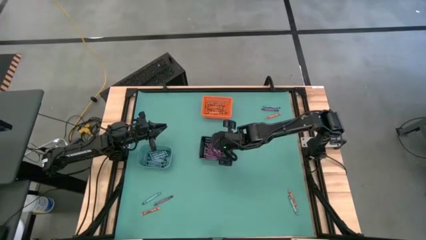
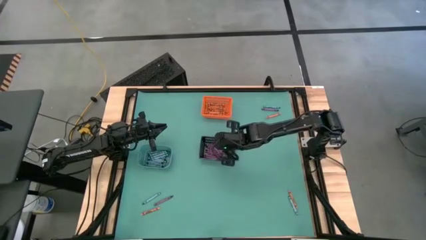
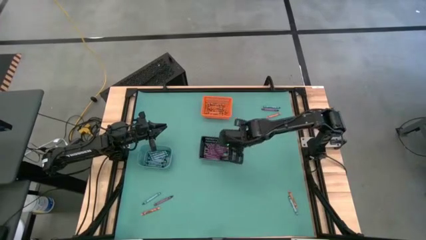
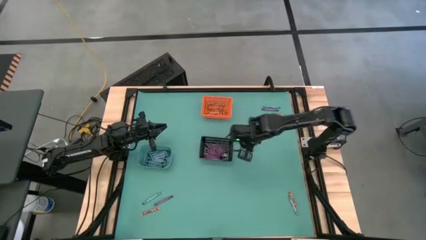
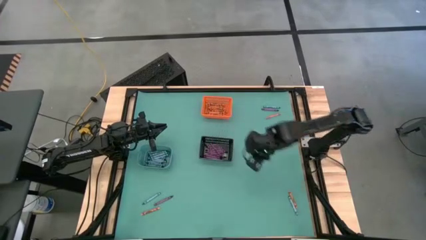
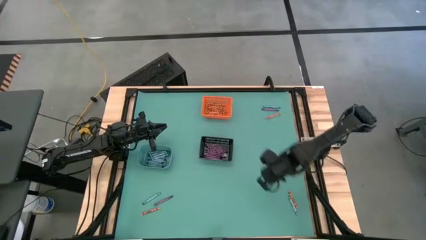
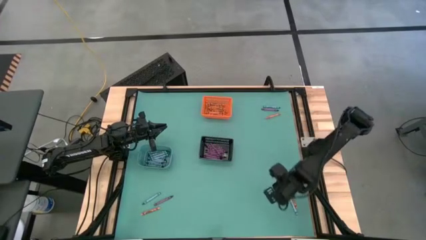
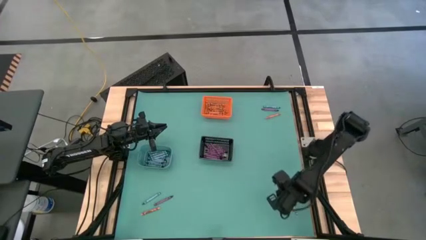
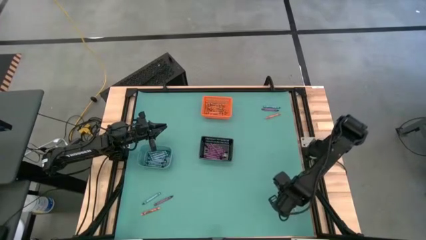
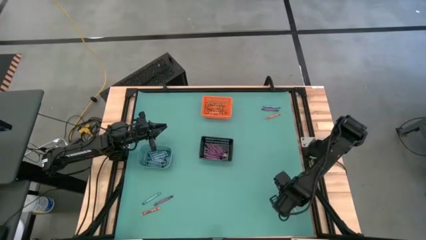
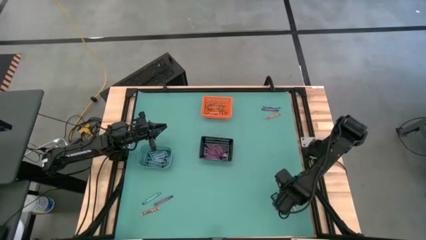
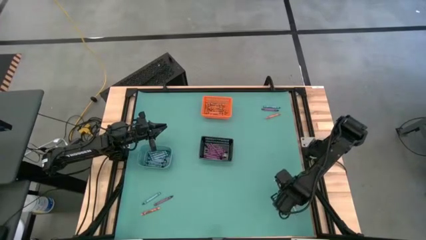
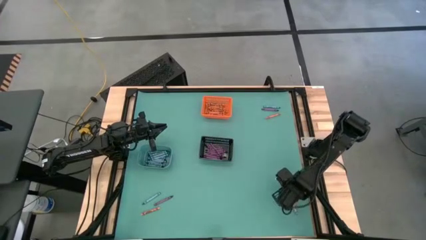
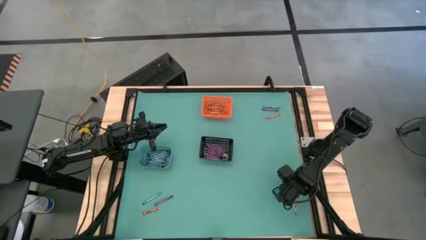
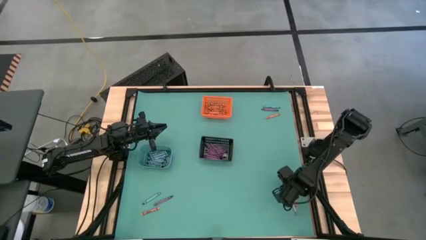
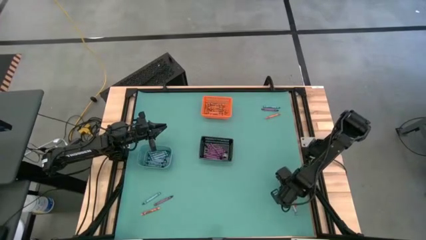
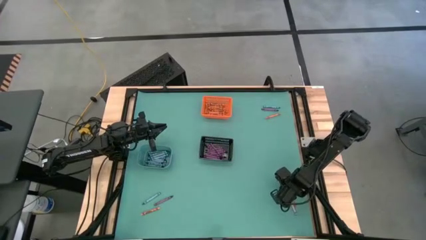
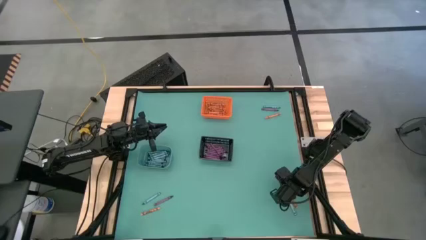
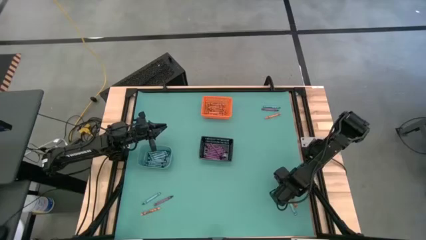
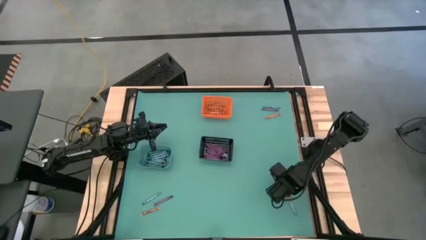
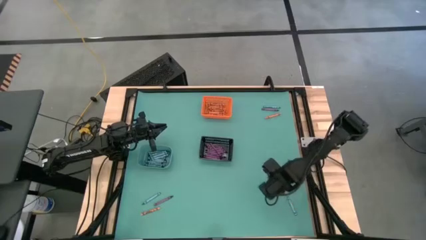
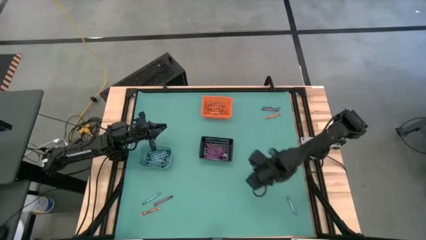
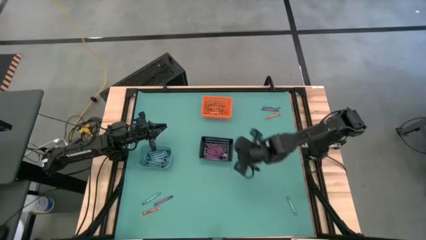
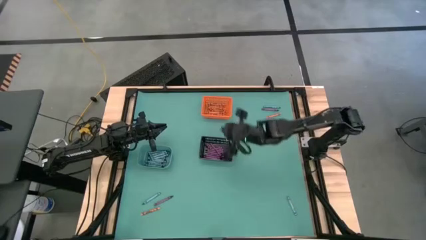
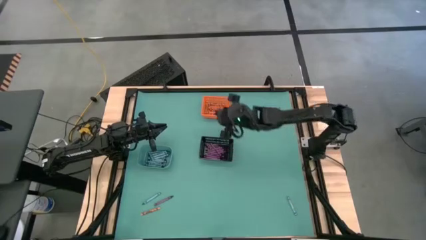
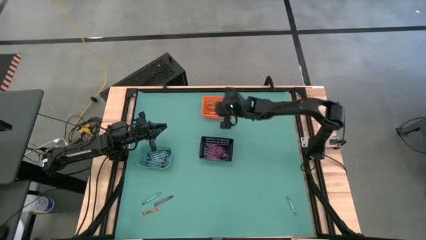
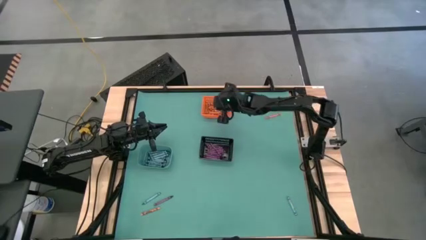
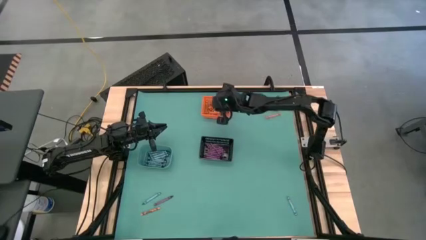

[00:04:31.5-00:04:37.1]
Task: Sort crayons
Put the orange crayon into the orange bin

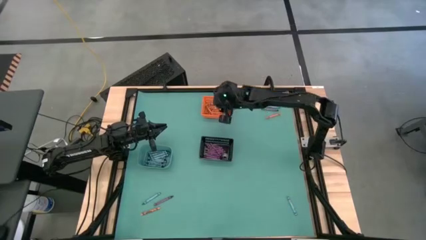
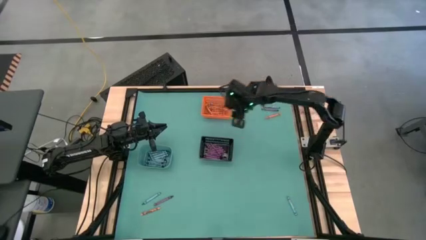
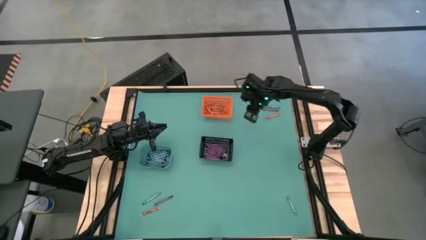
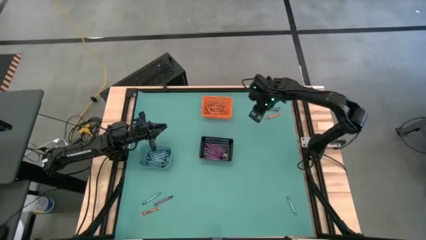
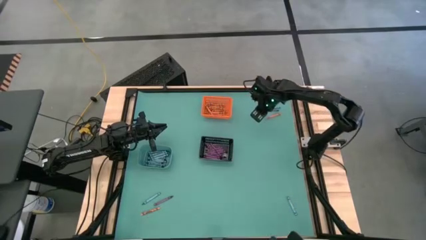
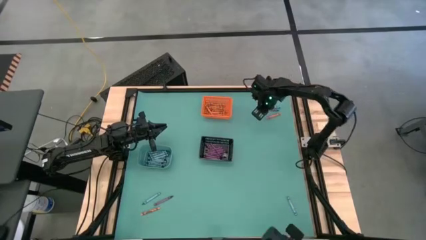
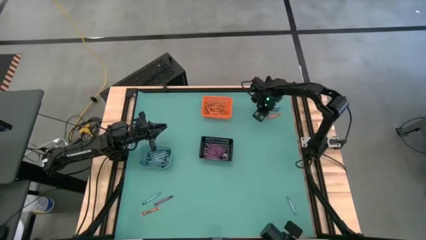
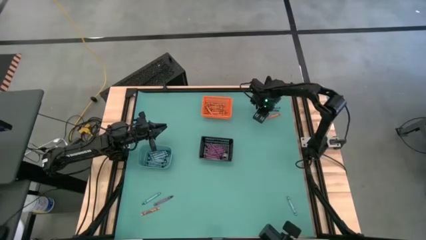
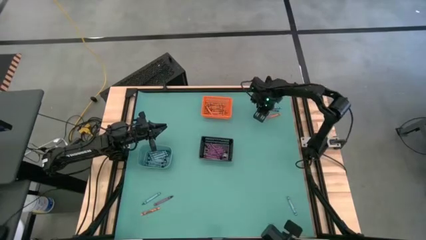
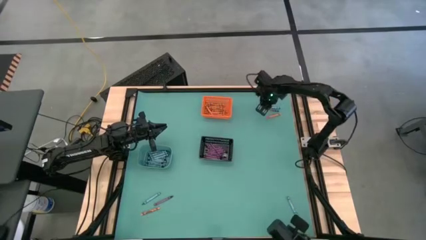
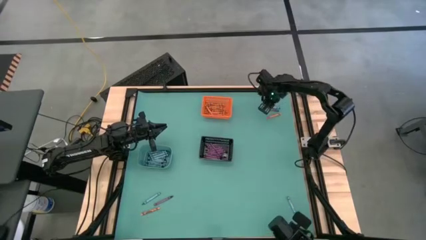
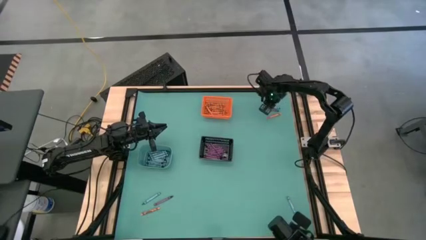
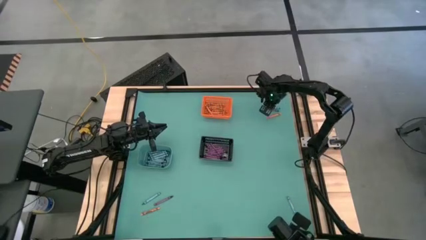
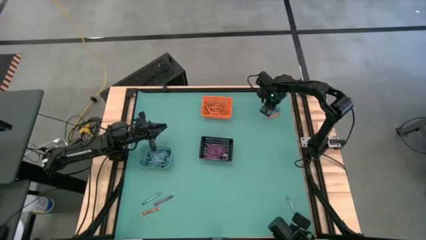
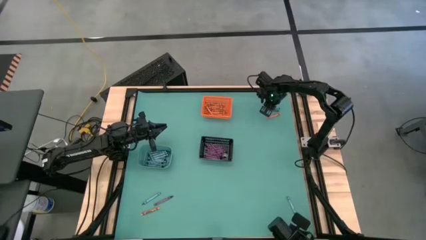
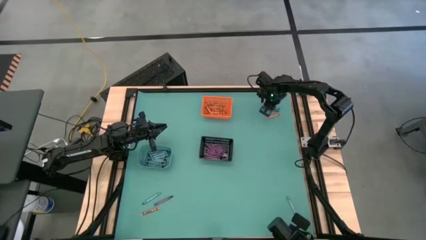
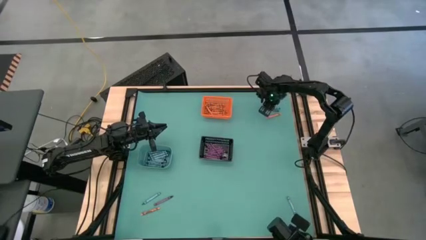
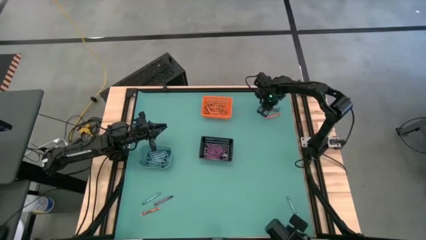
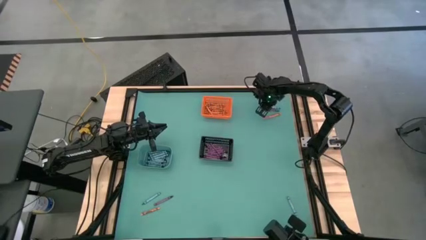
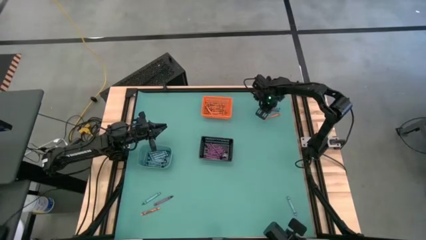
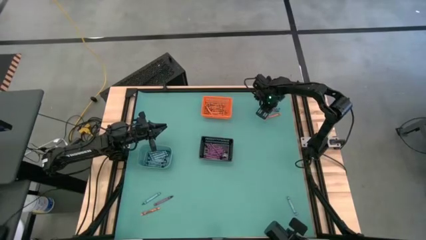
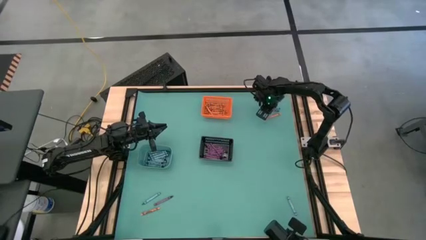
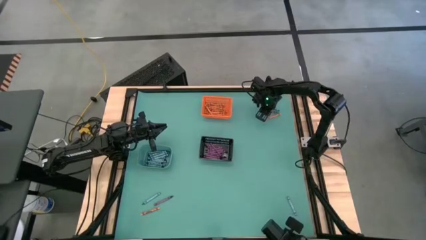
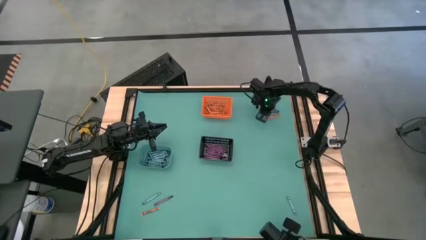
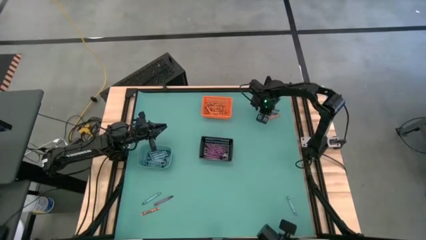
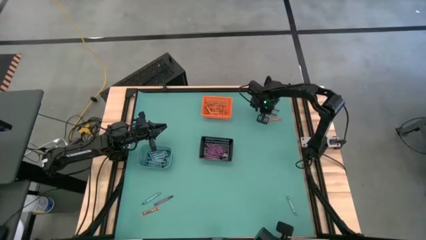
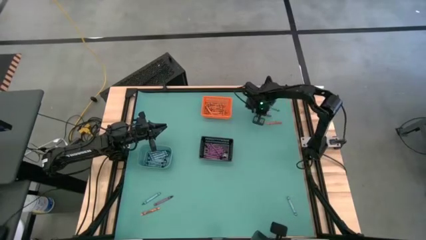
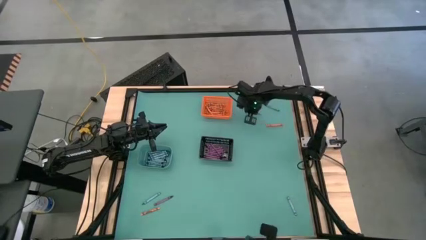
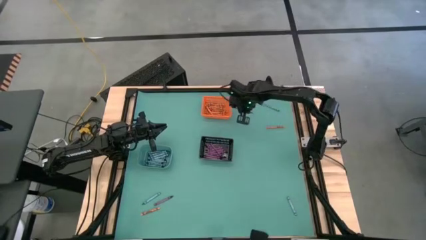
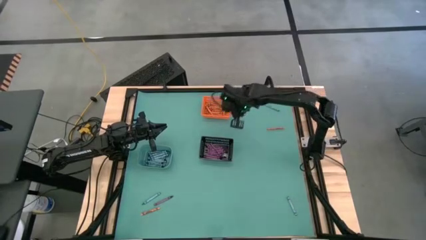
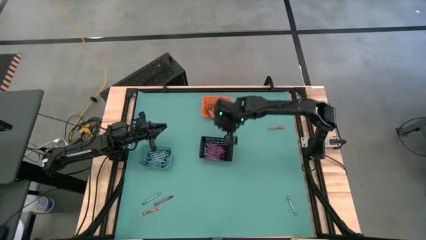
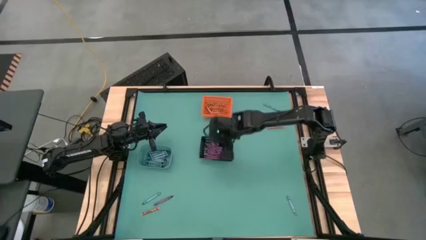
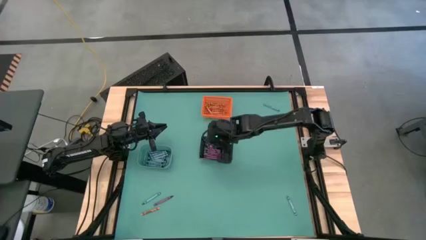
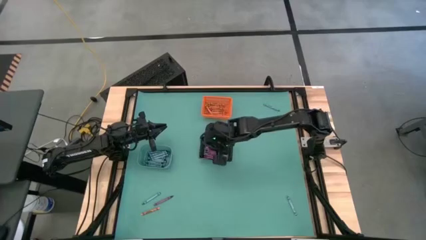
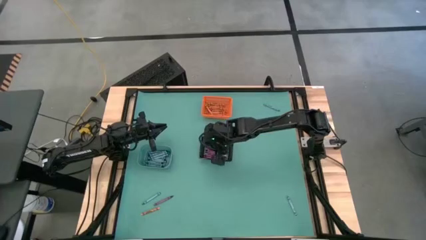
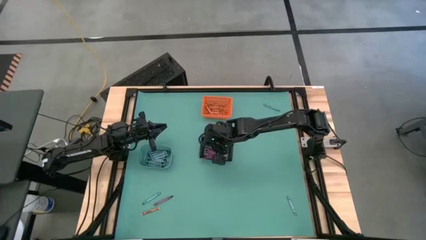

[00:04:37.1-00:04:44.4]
Put the violet crayon into the black bin

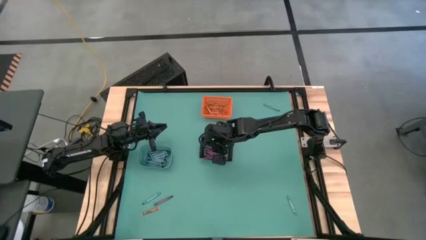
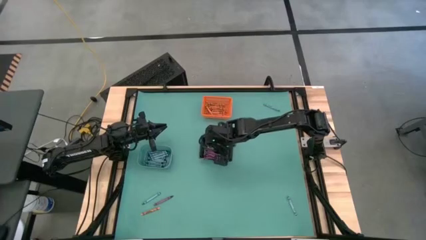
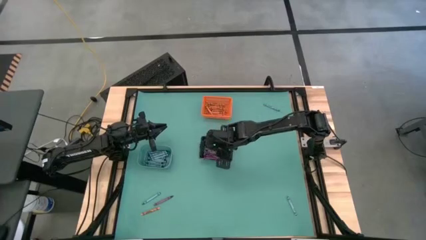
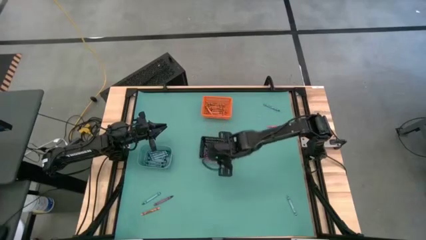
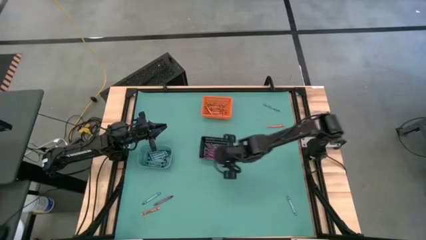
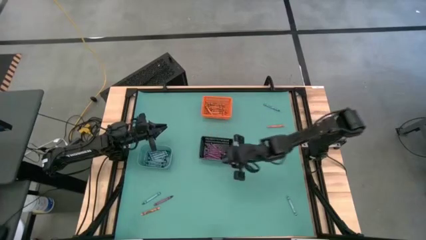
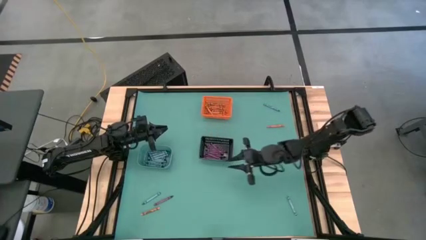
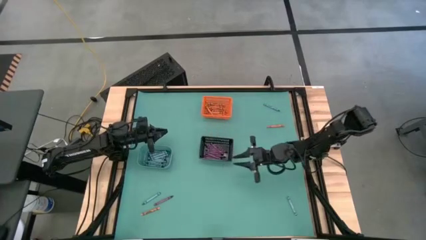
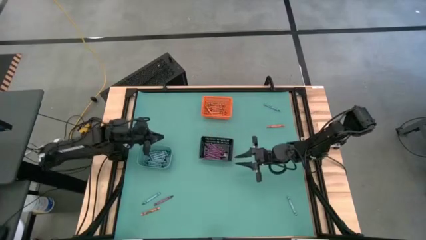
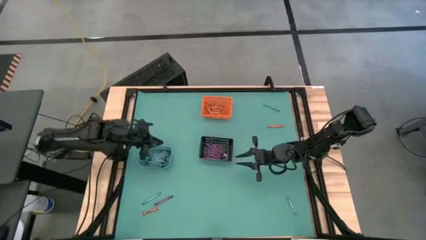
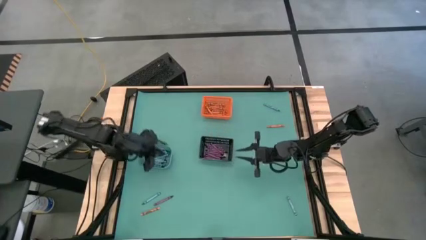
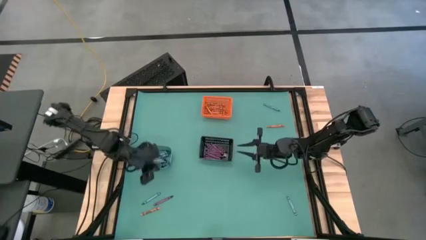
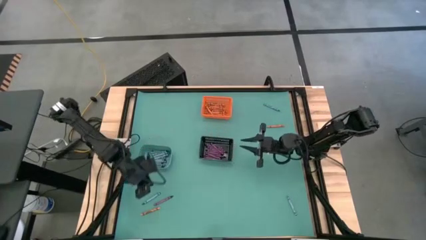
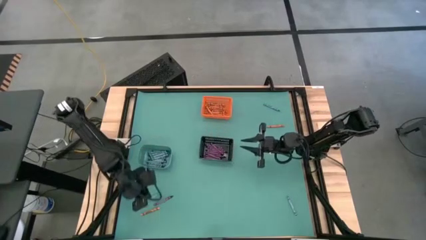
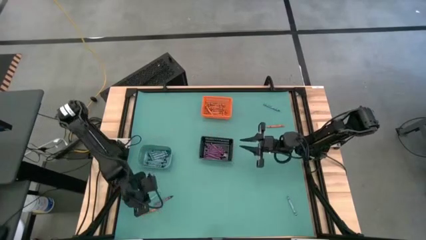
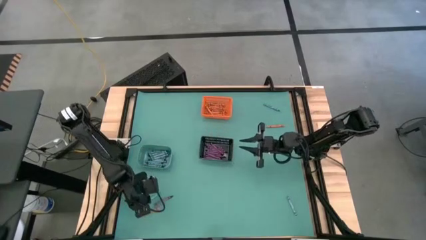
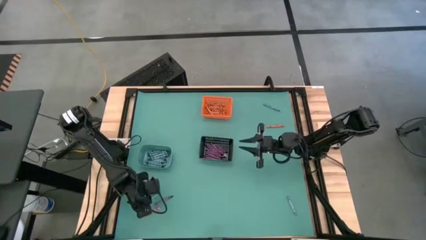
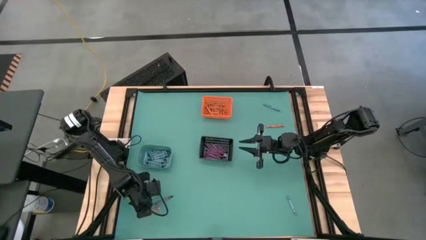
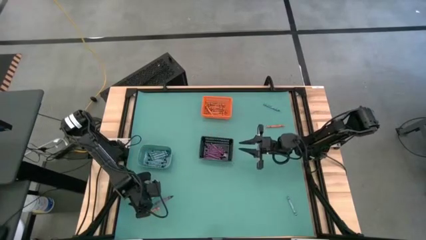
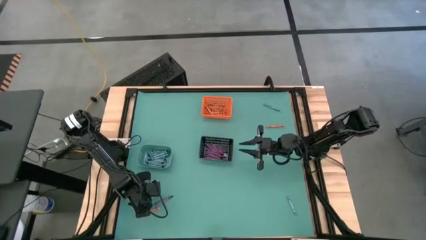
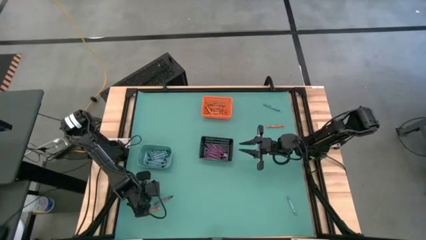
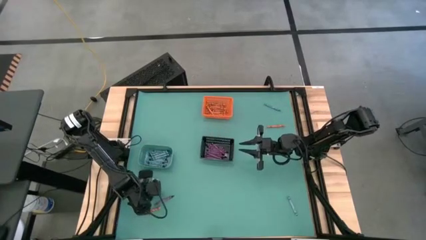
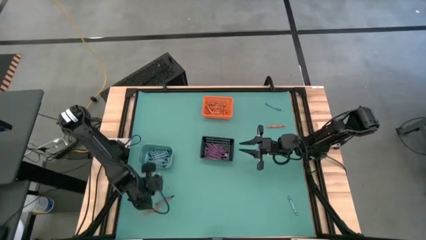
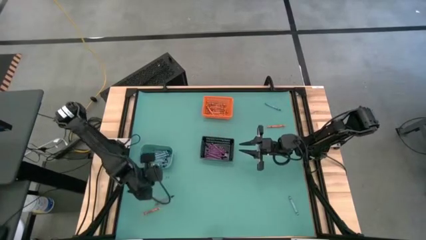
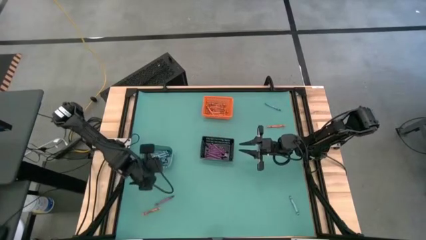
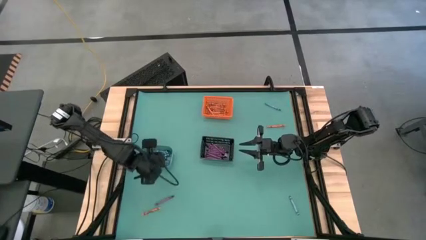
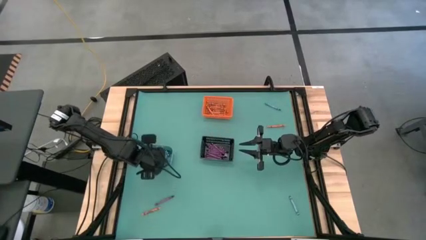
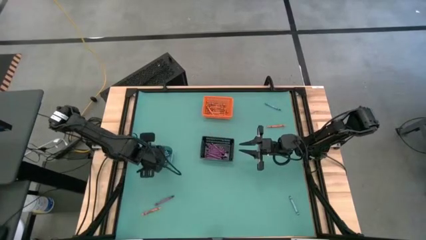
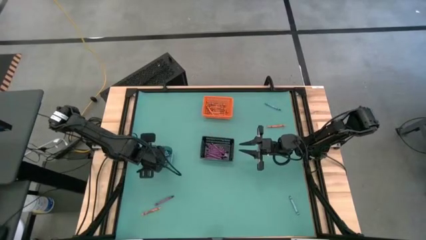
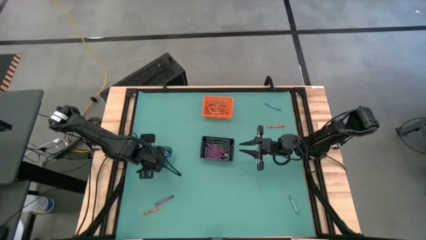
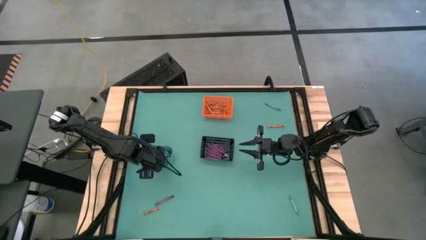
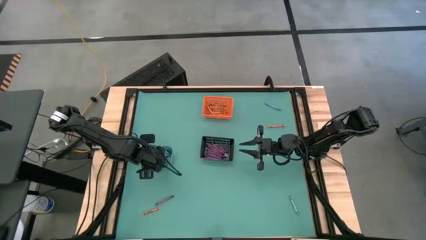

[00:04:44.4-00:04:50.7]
Put the blue crayon into the light blue bin
